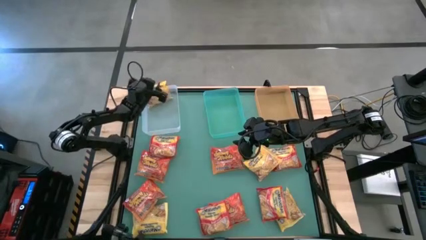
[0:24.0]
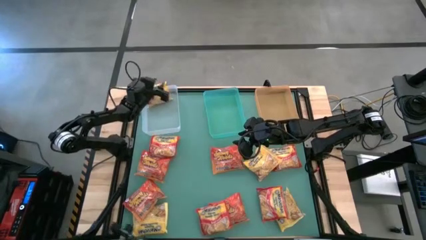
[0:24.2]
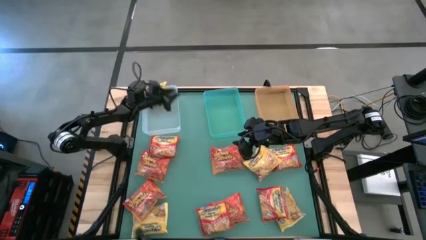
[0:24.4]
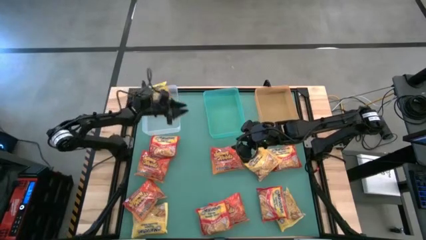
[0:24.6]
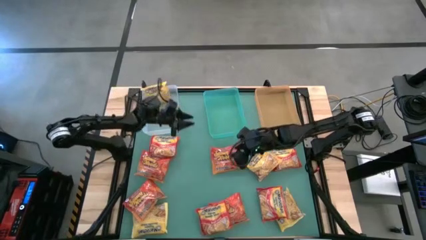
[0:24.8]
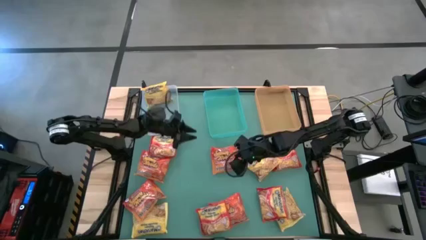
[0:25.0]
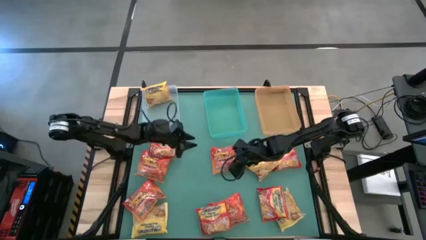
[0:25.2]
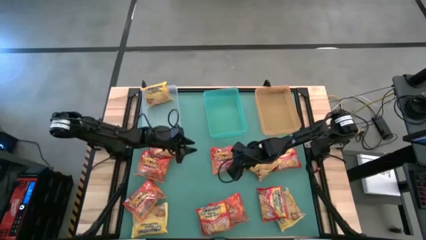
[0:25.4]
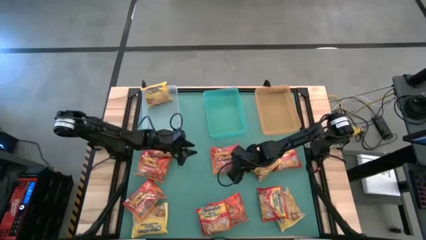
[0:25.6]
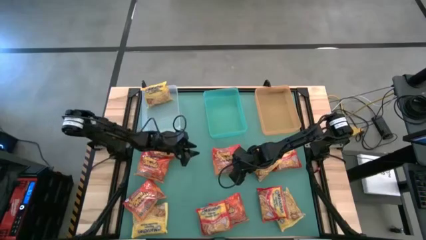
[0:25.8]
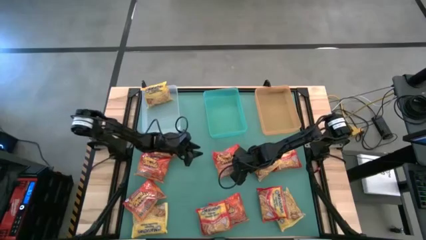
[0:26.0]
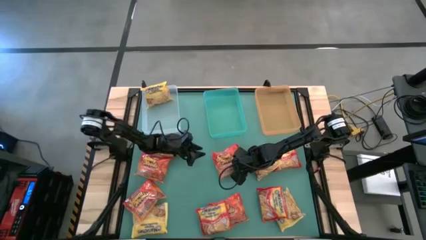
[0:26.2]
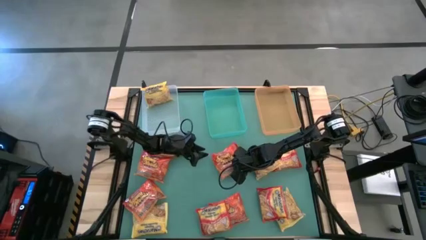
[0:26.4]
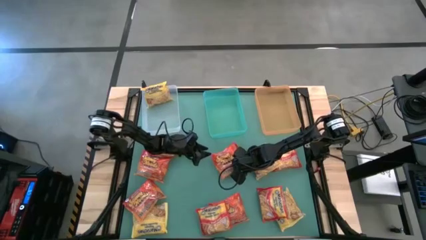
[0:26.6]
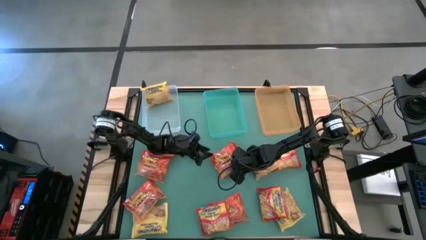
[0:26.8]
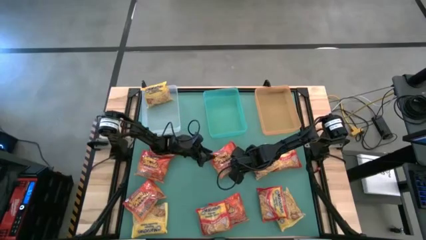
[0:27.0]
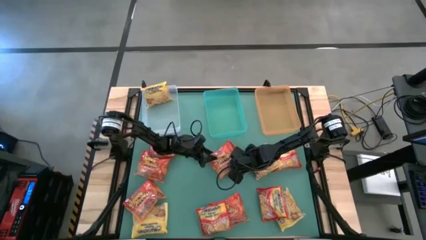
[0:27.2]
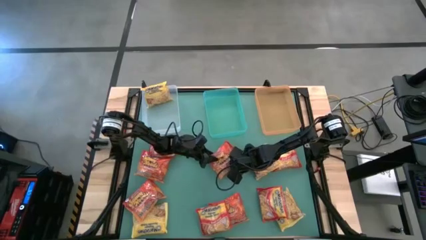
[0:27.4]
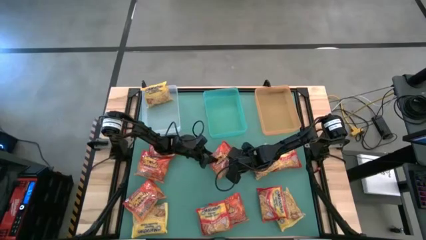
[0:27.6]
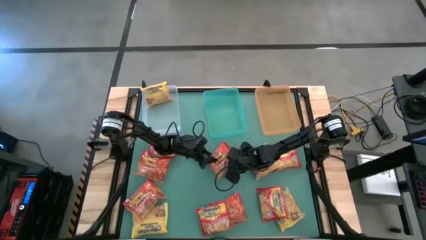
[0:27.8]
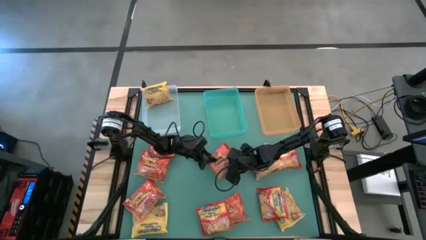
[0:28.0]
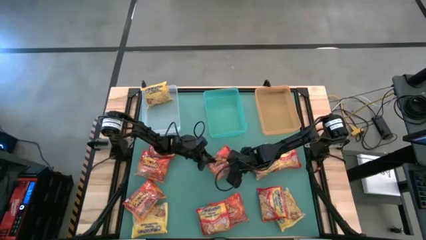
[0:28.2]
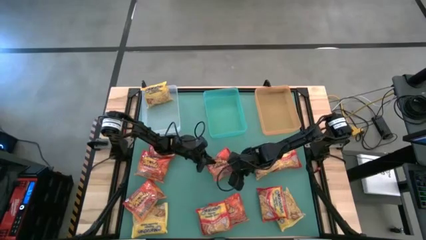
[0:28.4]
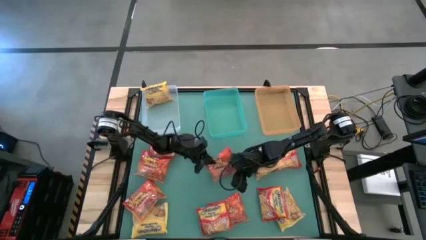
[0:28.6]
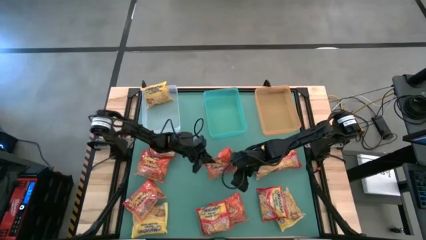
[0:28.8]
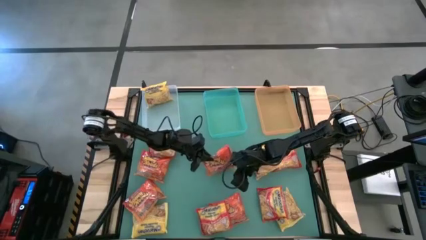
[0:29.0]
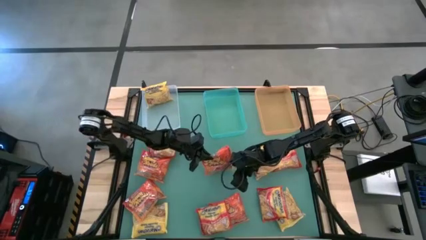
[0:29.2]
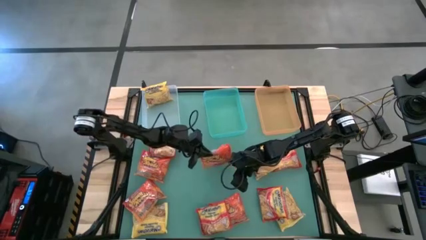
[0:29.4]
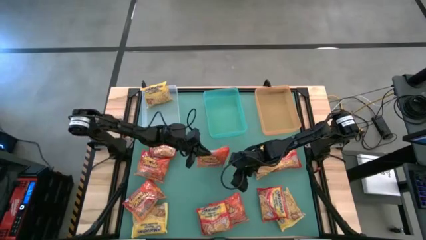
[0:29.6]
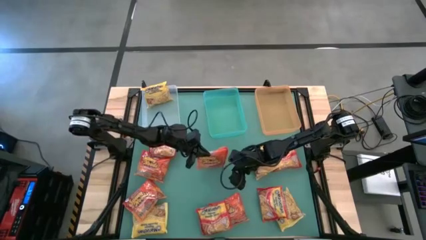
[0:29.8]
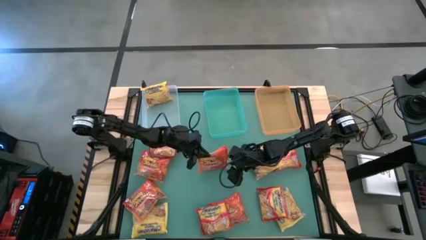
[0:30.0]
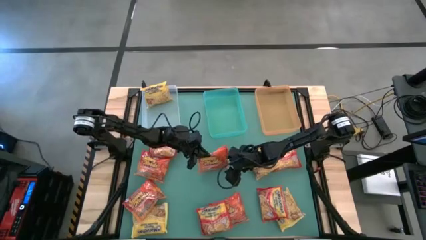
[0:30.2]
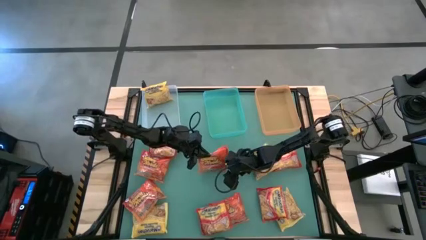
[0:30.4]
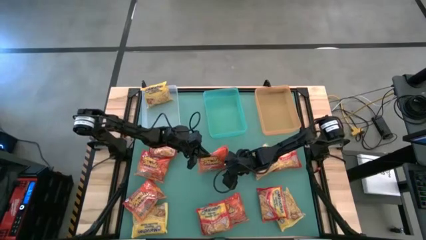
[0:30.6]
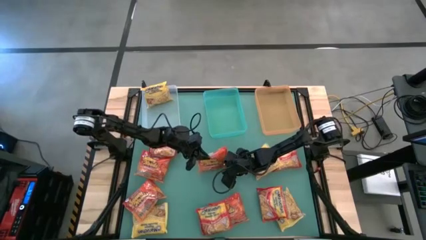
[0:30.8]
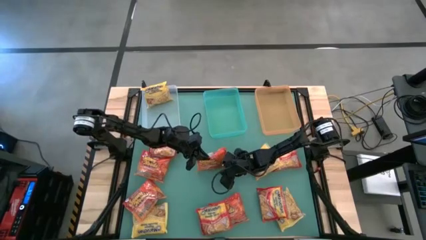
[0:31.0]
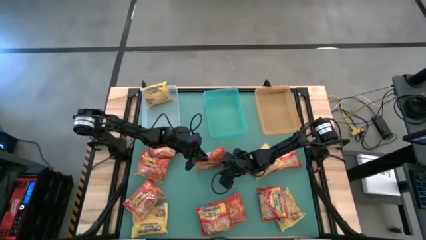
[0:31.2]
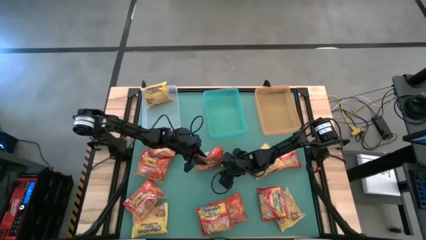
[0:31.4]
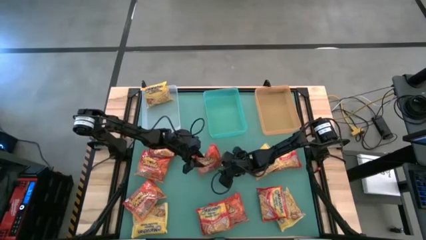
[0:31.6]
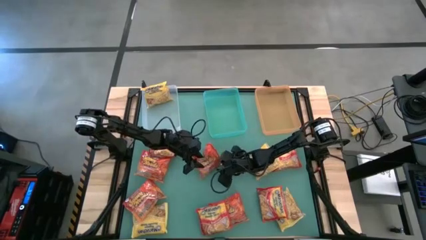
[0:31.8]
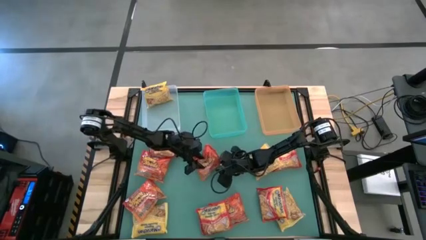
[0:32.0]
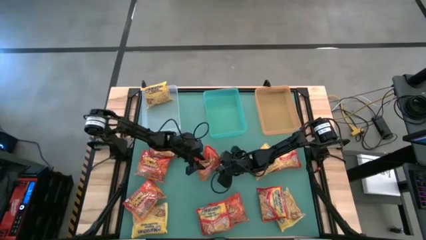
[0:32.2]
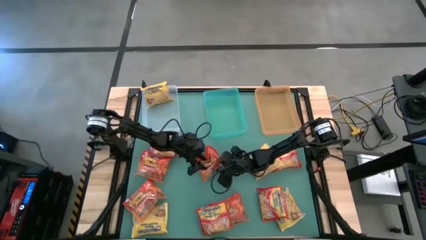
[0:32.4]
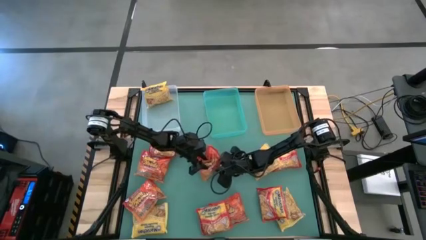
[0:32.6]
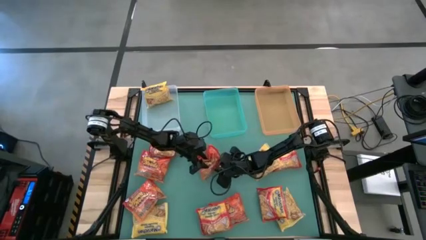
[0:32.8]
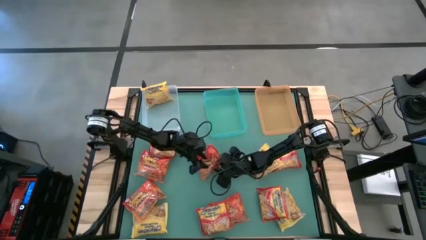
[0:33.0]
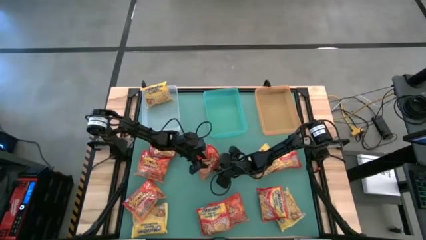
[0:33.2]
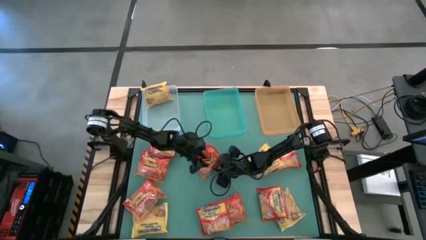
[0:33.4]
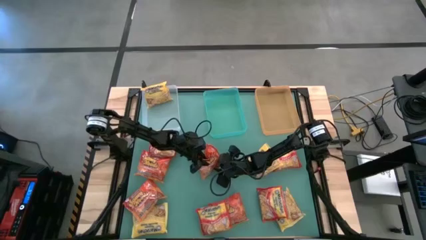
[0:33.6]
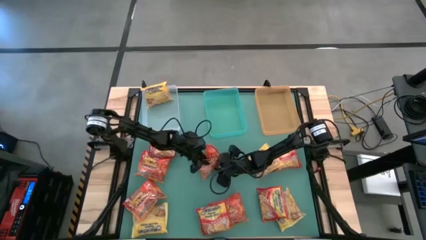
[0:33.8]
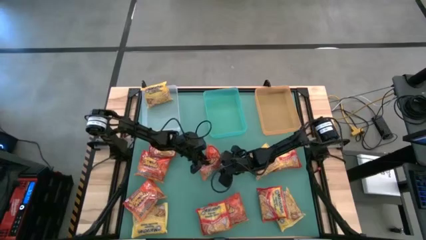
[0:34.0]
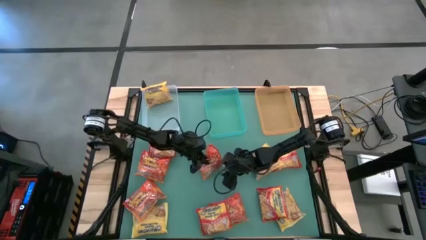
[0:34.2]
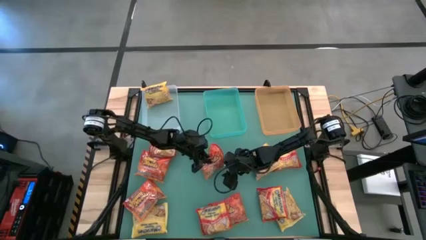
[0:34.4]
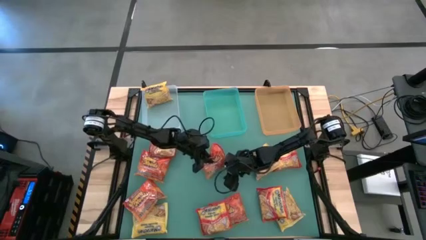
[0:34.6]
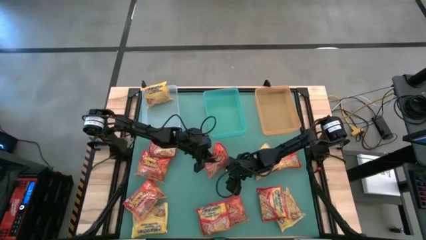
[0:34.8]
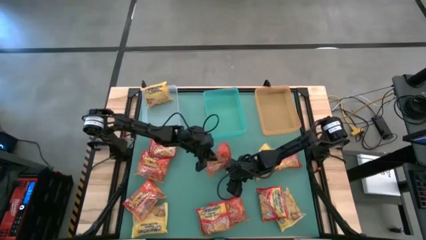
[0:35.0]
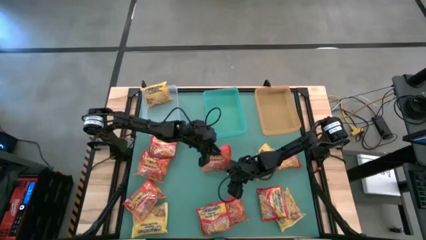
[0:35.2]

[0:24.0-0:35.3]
Task: Sort Maruchan noodles
Put the red noodle pack into the green bin

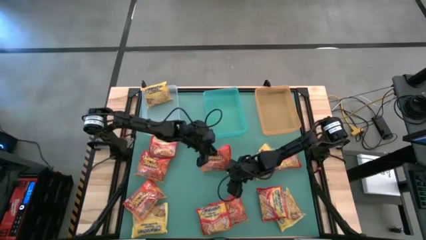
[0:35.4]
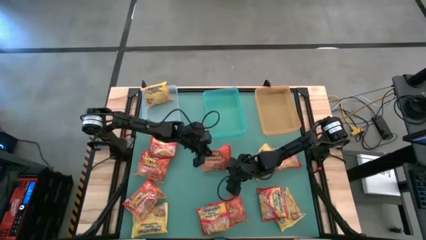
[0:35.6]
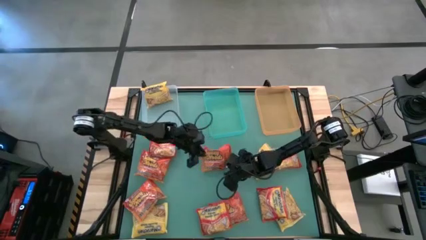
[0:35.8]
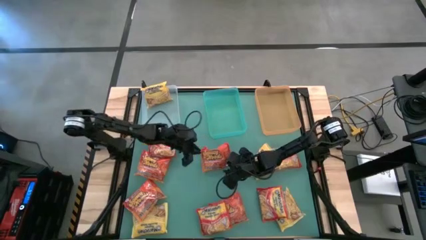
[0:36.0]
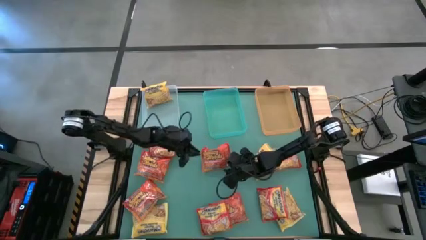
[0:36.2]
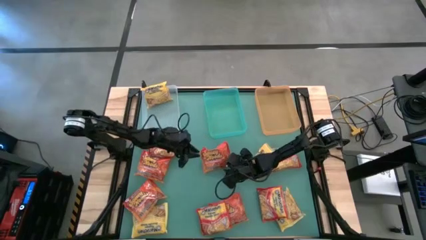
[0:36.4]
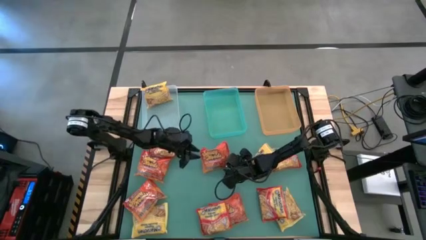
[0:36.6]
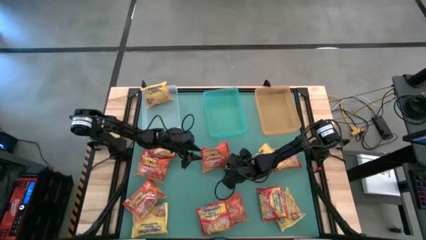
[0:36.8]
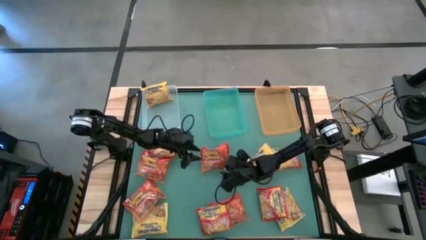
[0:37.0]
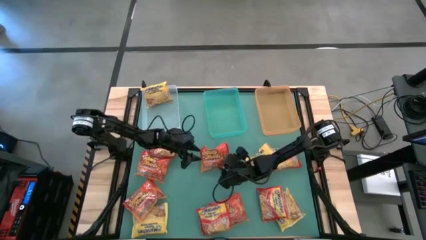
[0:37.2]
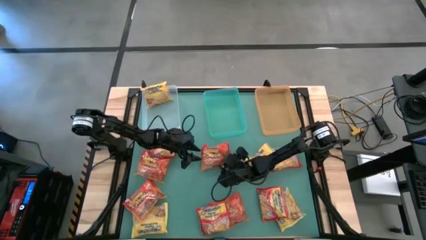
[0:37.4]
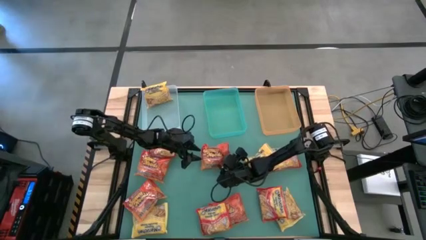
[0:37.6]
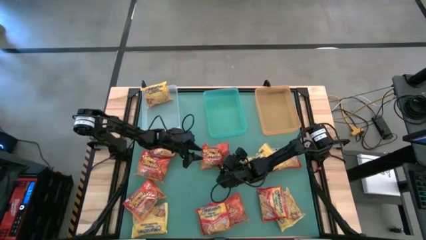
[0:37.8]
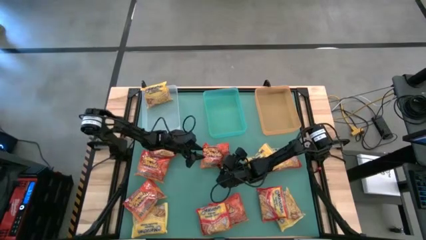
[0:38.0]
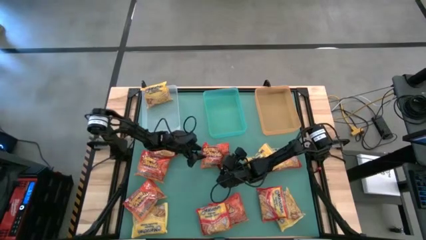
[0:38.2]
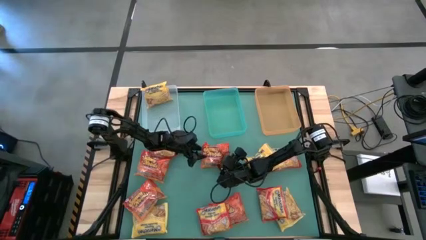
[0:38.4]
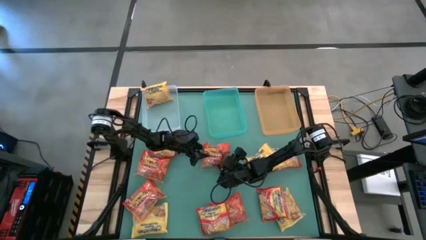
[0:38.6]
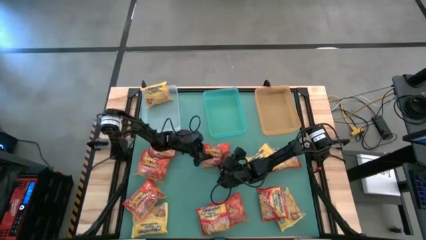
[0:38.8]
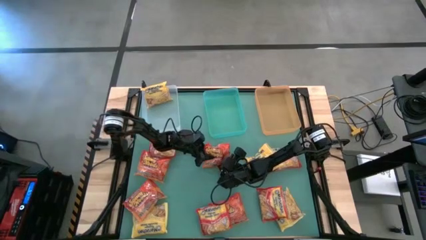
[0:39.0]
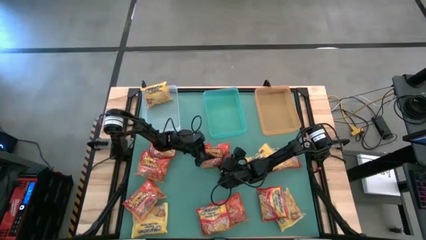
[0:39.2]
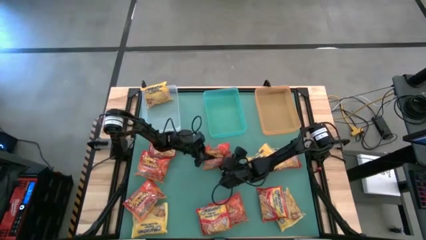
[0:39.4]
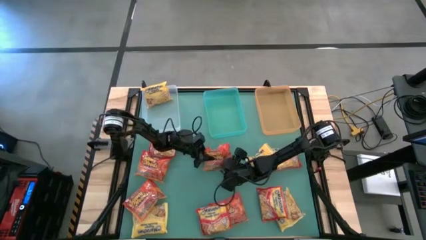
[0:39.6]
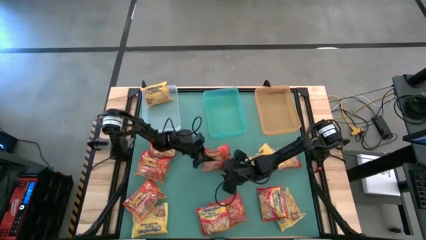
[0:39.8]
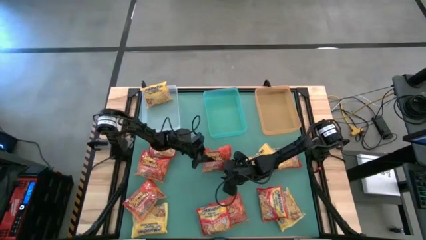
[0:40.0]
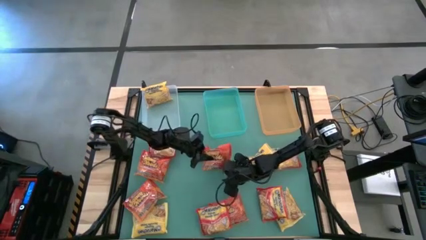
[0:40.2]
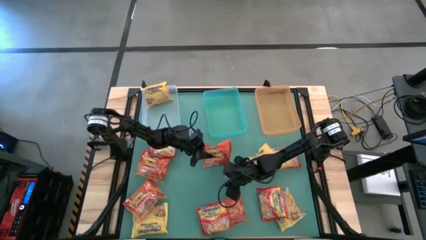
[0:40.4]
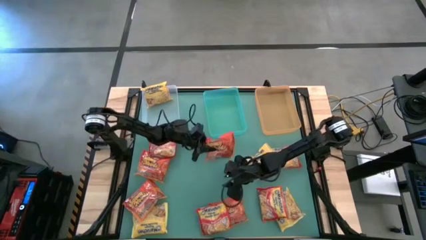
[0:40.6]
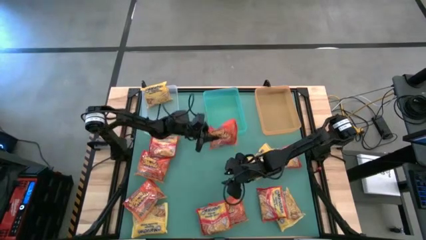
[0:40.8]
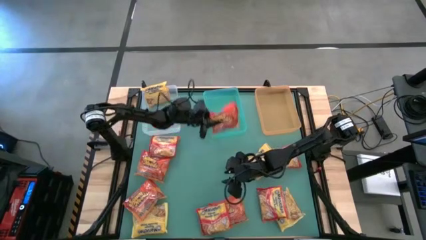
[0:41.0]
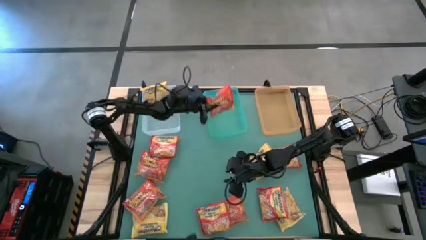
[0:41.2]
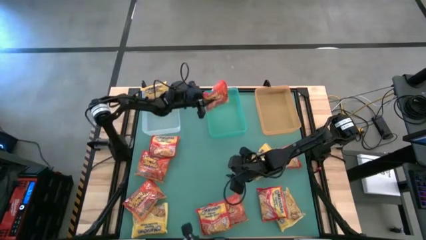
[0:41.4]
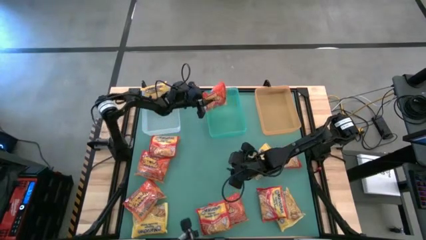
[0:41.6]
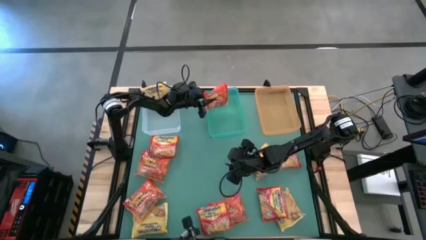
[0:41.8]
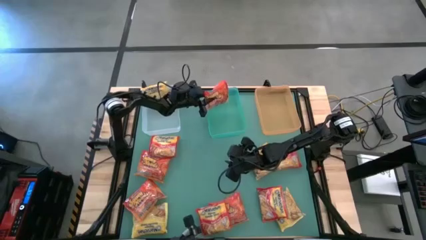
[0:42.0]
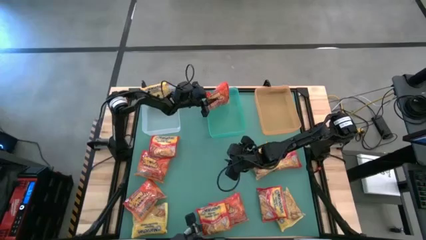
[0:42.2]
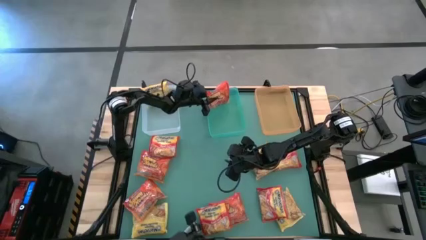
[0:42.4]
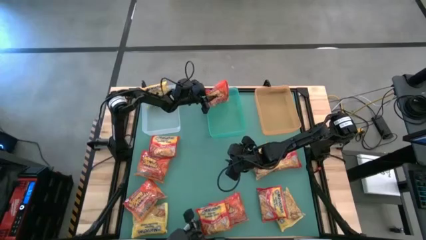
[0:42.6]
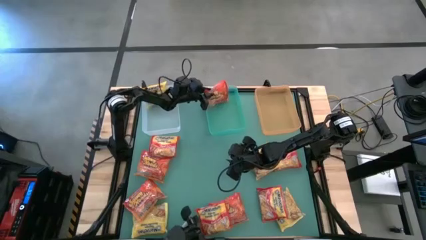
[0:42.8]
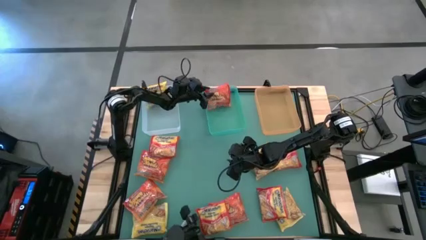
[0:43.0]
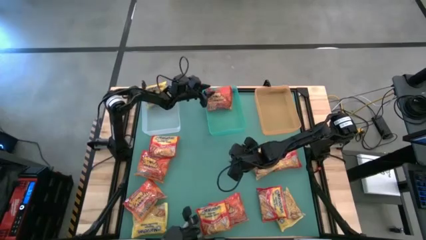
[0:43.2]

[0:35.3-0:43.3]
Put the red noodle pack into the green bin
